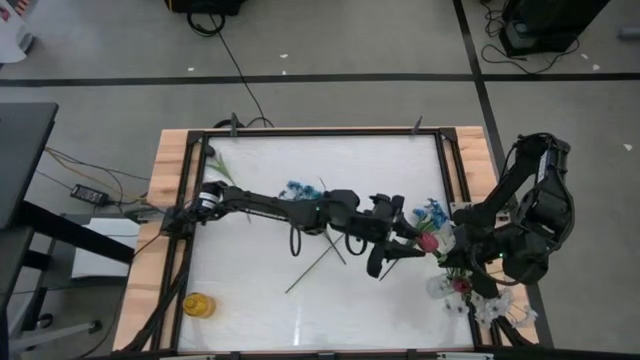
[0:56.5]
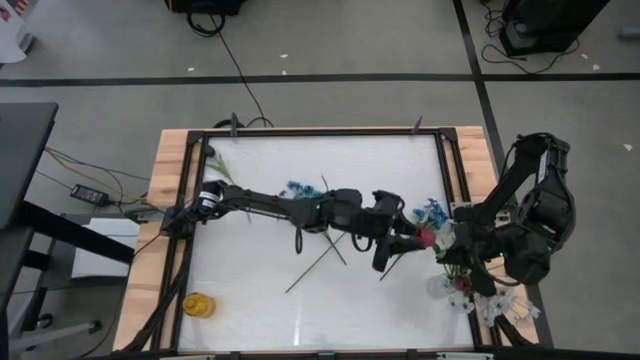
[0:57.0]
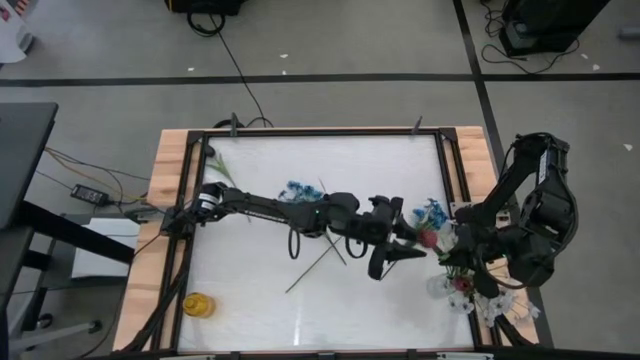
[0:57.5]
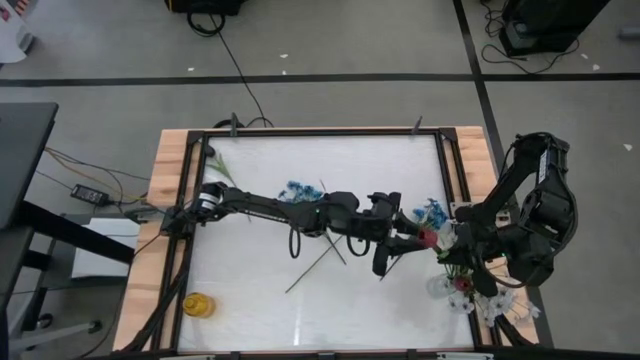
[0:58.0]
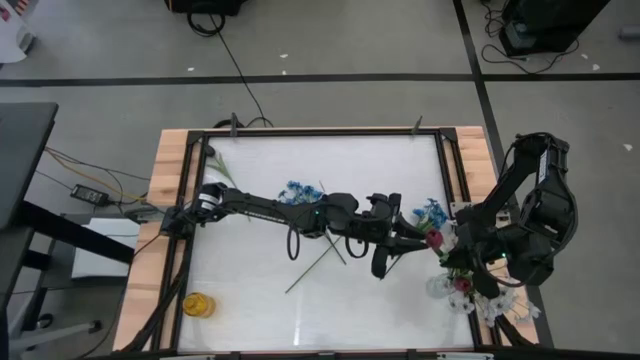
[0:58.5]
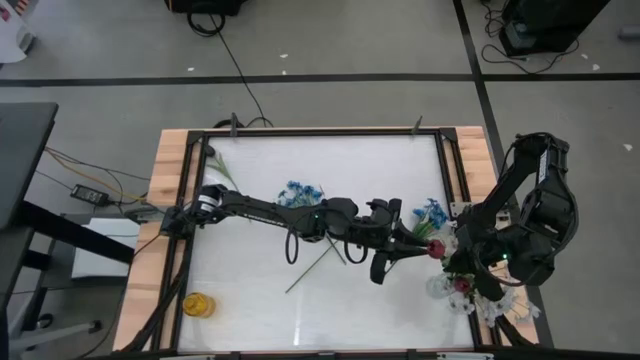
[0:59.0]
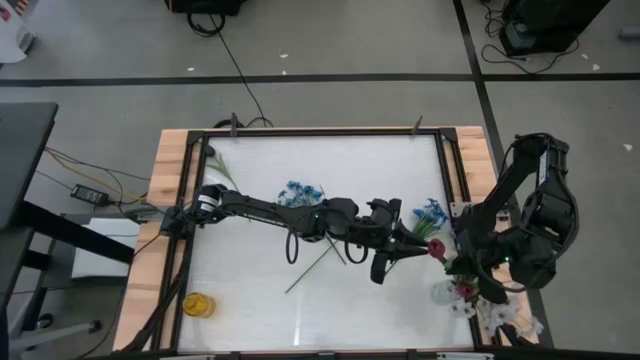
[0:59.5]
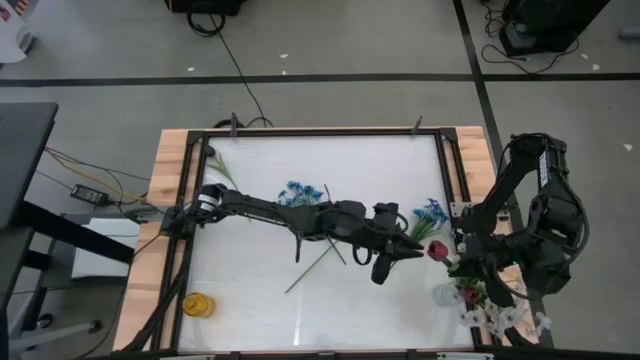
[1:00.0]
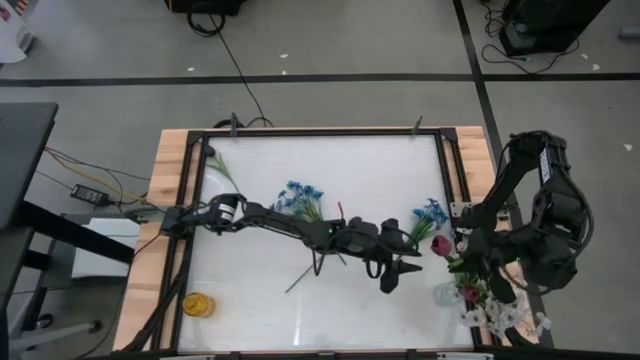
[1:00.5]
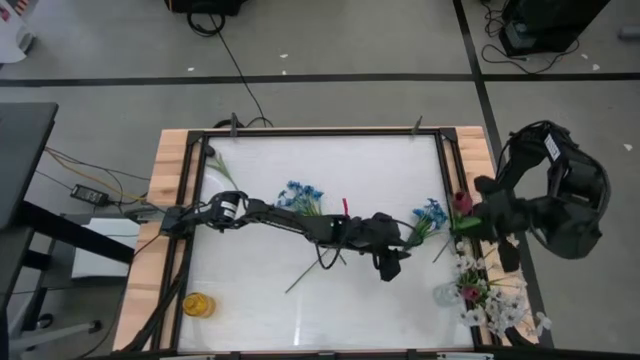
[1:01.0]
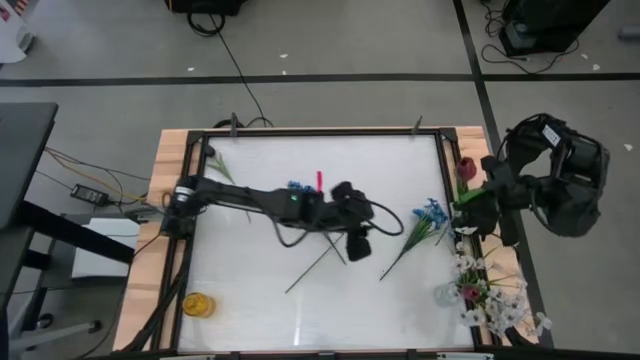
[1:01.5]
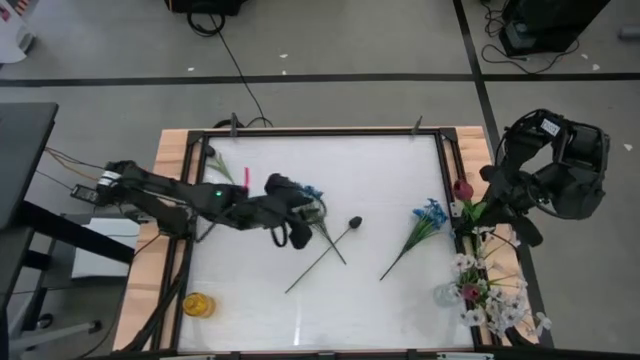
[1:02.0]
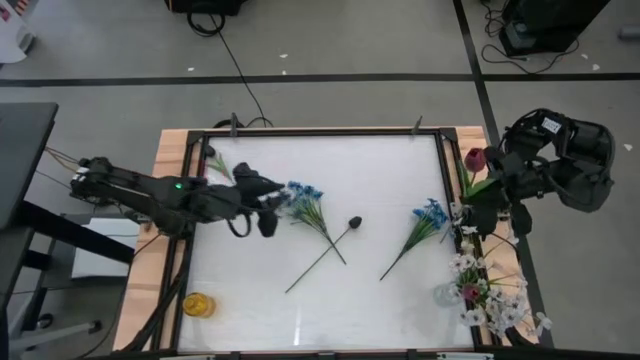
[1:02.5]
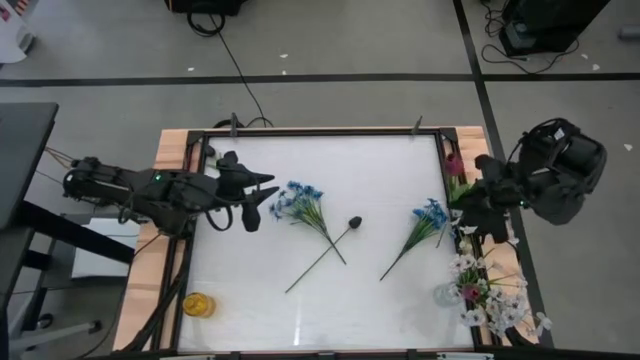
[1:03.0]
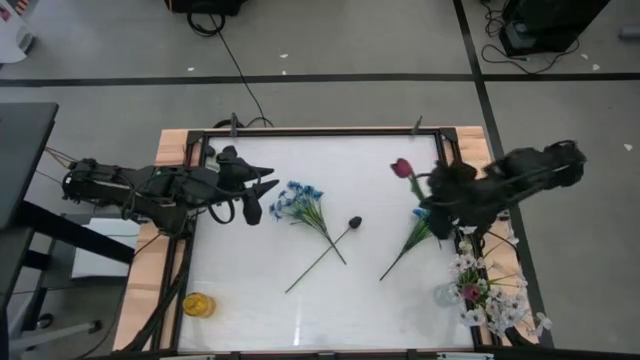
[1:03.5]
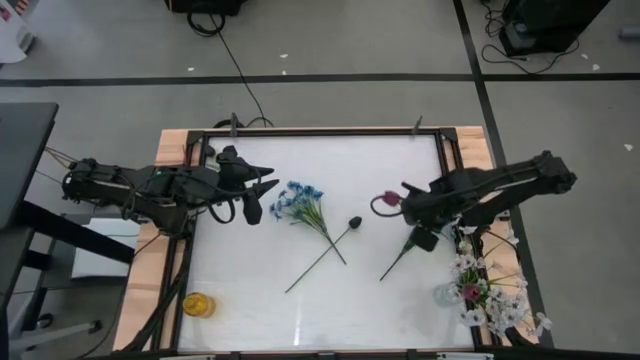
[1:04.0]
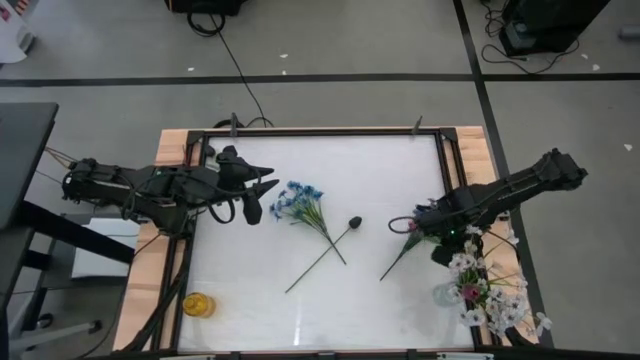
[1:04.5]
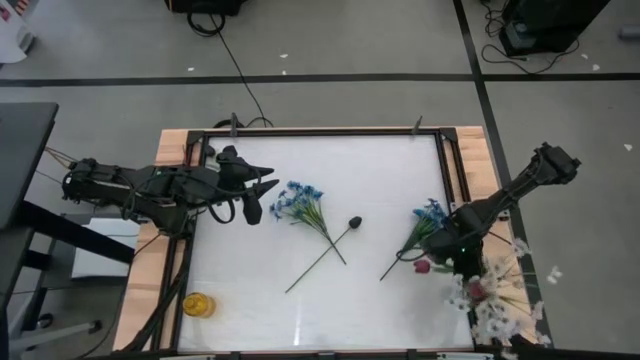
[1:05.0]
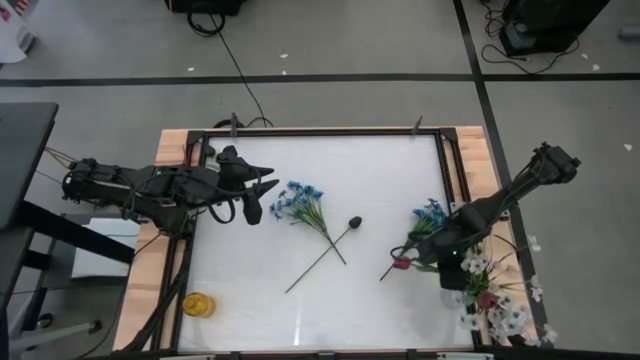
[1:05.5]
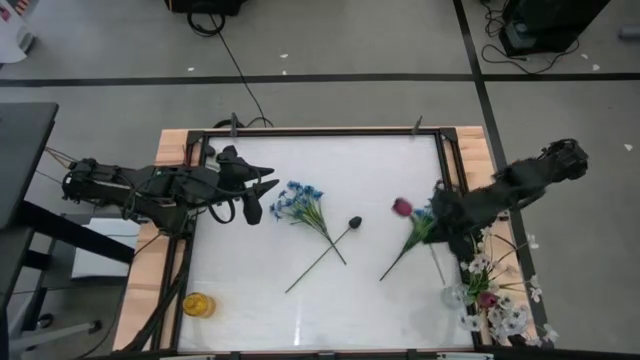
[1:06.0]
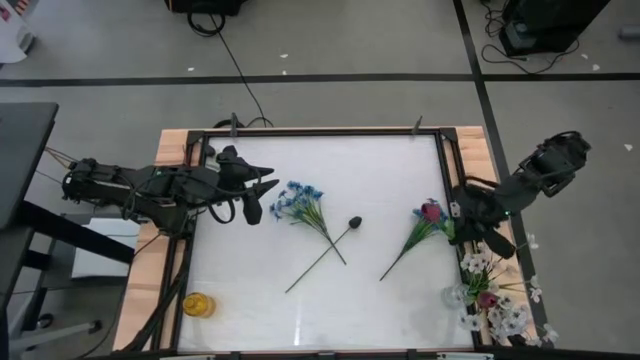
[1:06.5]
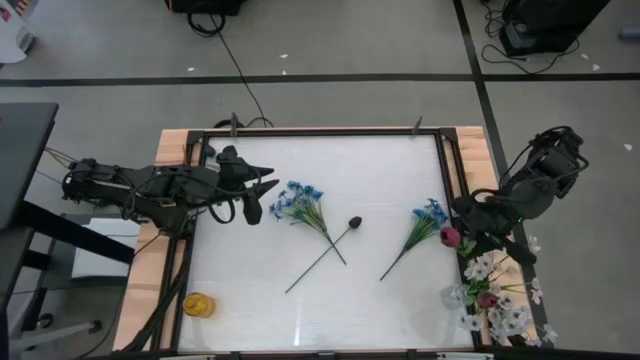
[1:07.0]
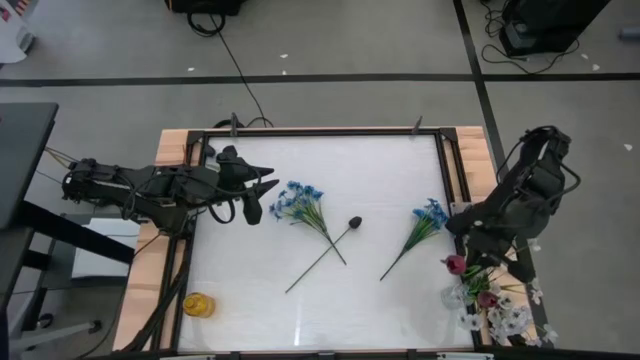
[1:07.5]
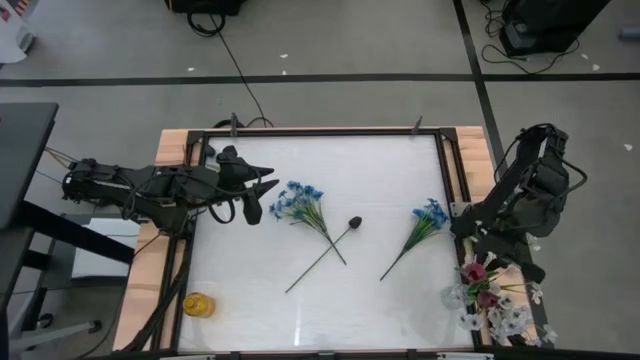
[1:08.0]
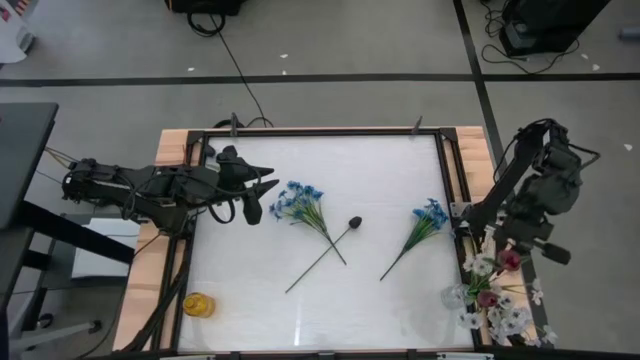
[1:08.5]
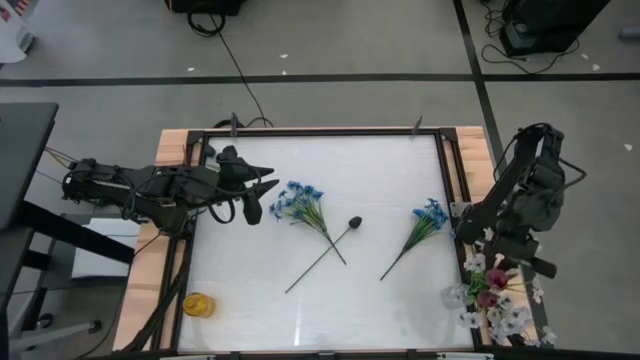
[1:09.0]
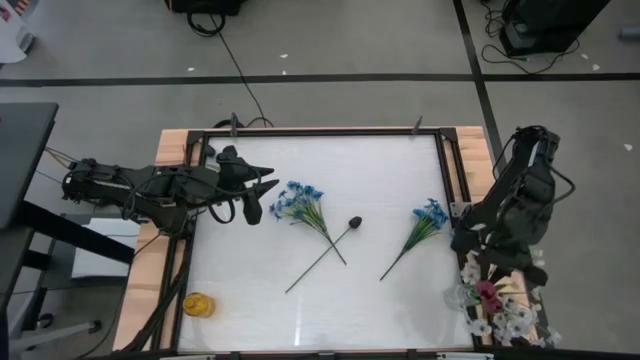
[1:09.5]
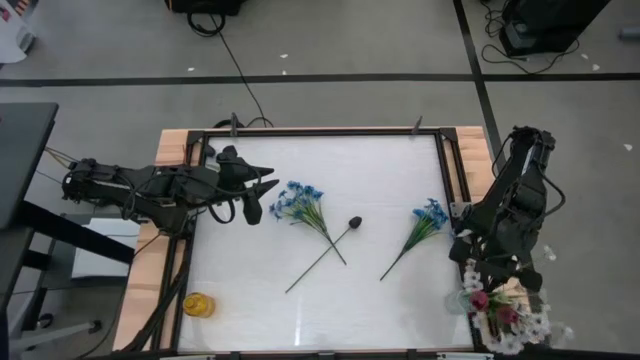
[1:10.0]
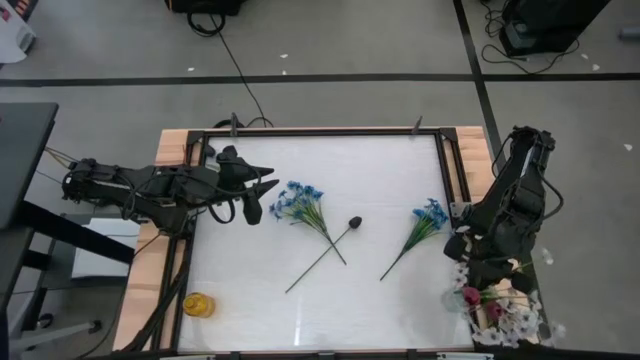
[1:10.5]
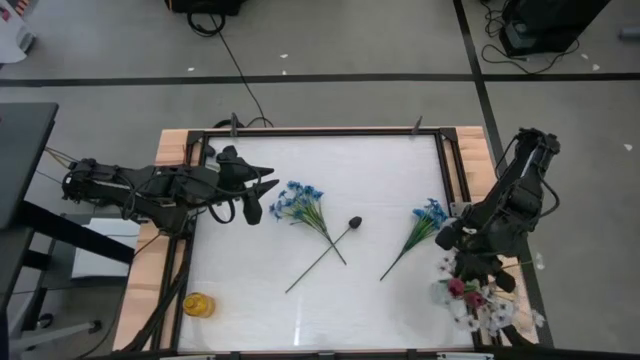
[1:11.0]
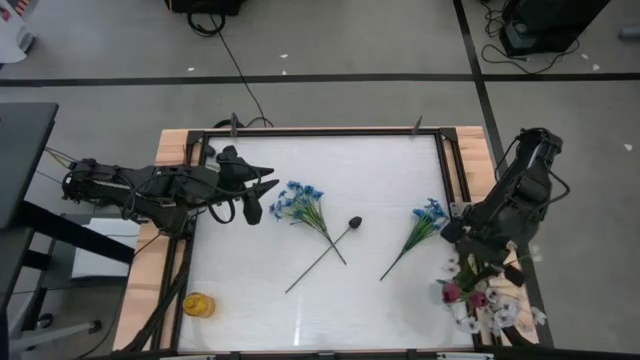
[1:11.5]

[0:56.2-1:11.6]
Task: Sort flowers into vase by color
Put the red tulip into the transparent vase

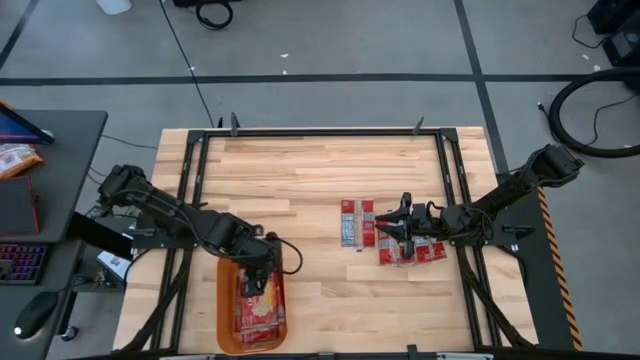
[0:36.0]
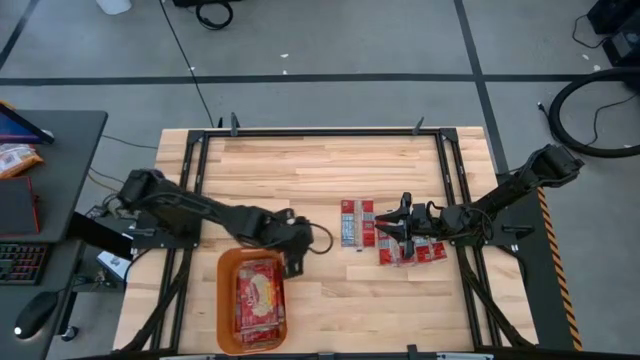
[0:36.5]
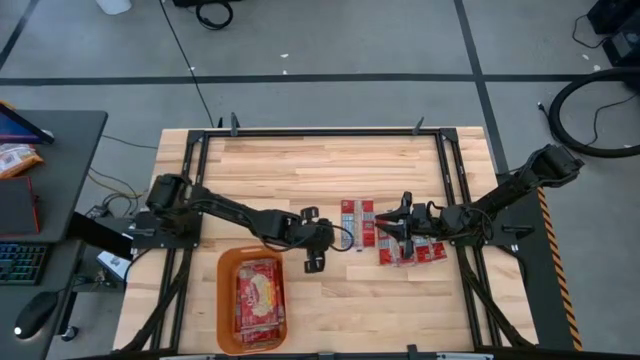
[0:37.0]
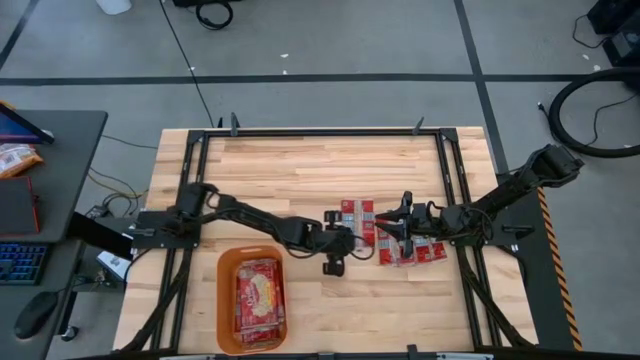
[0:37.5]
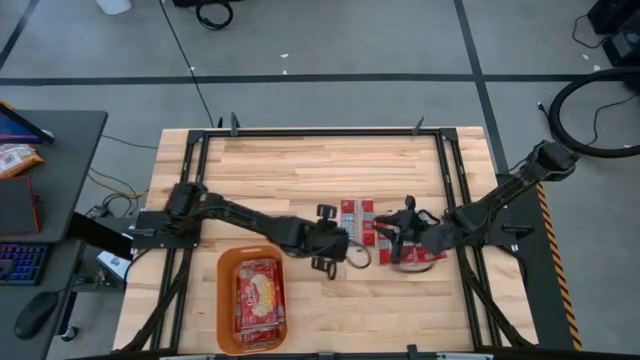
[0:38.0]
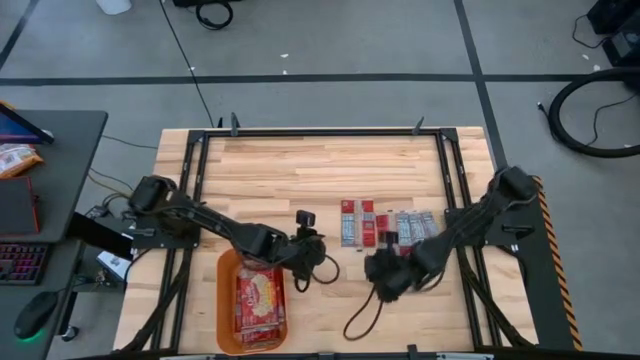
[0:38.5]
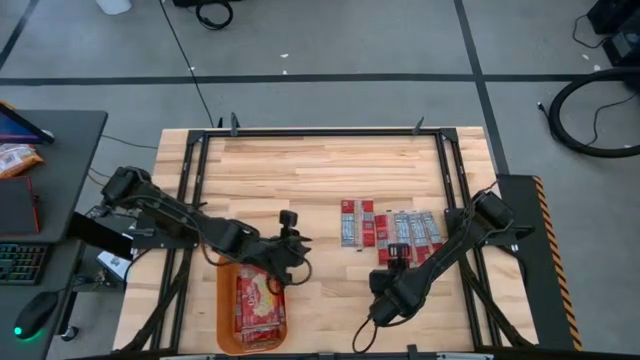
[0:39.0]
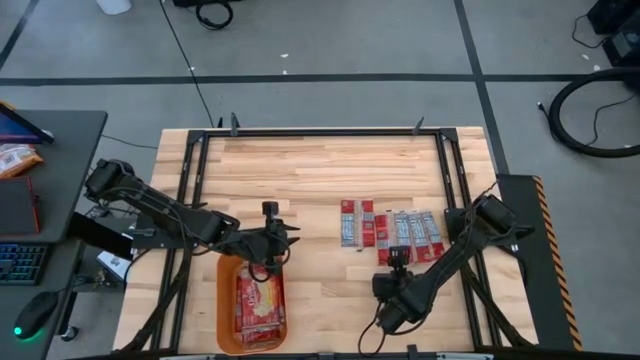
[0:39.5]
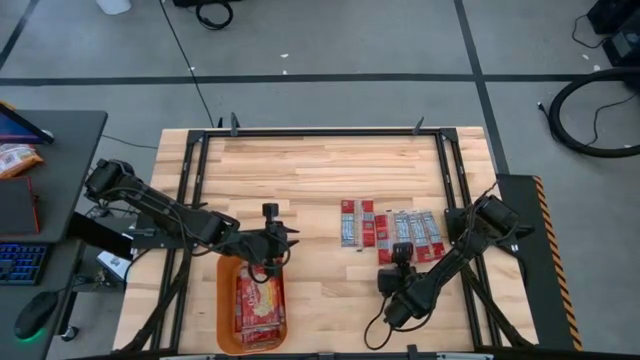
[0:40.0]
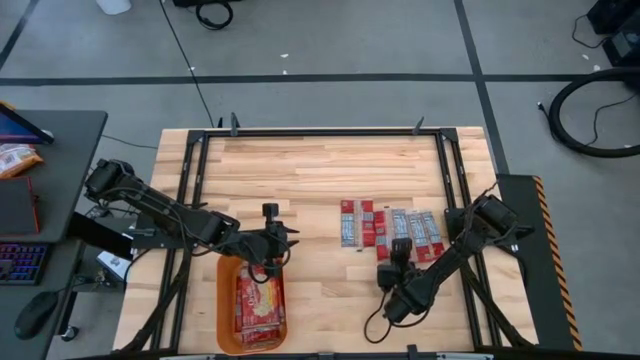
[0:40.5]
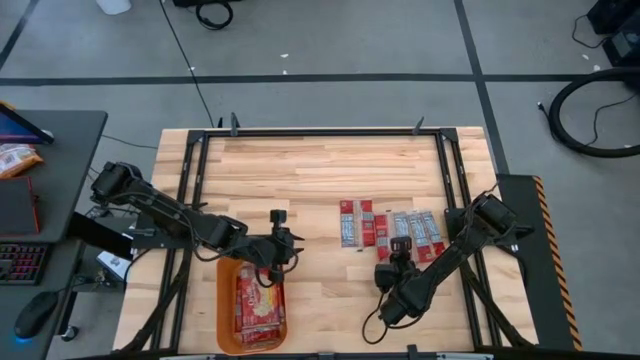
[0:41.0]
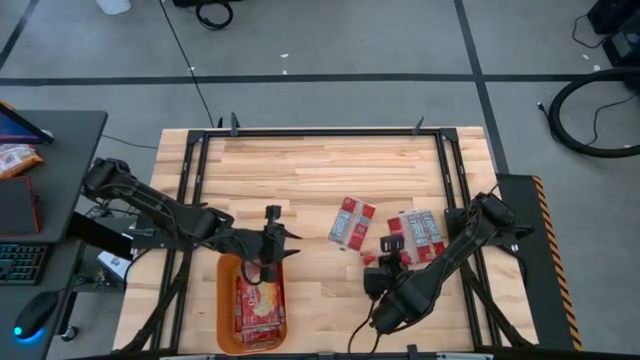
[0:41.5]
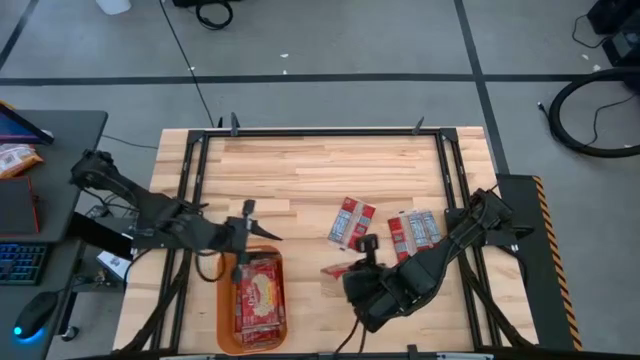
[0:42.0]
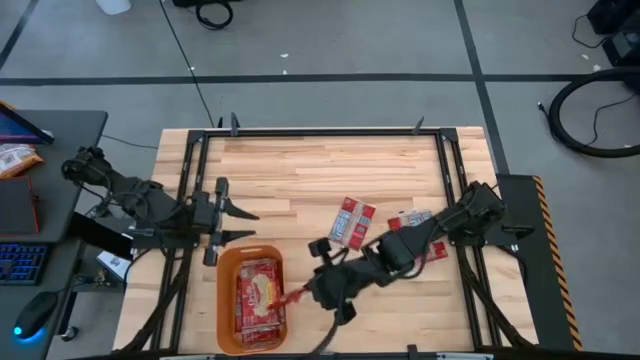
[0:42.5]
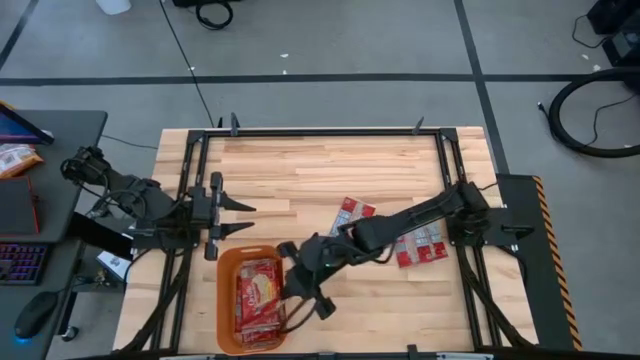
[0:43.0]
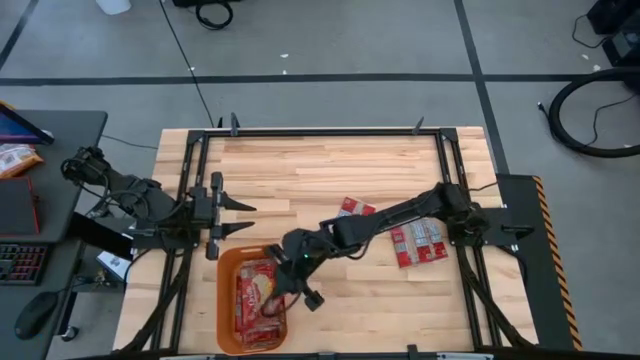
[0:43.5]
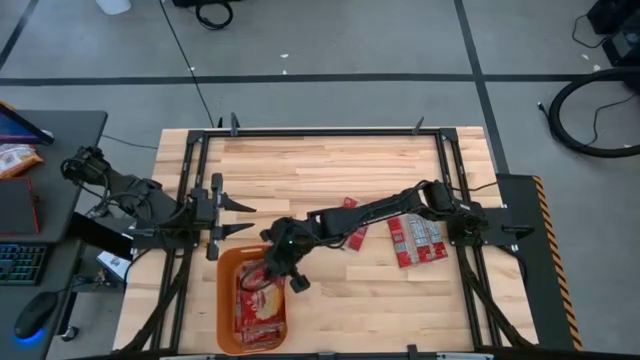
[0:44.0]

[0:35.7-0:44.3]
Task: Sort popcorn bags into baskets
Put the red popcorn pack into the orange bin
